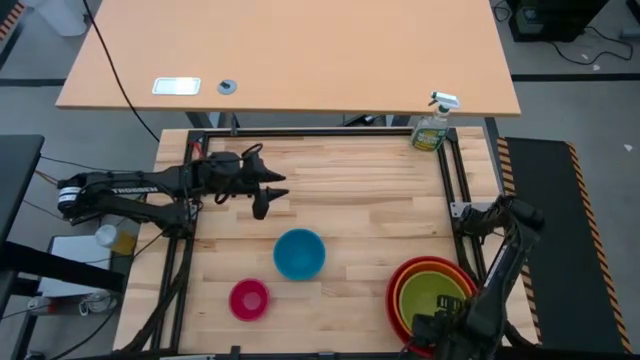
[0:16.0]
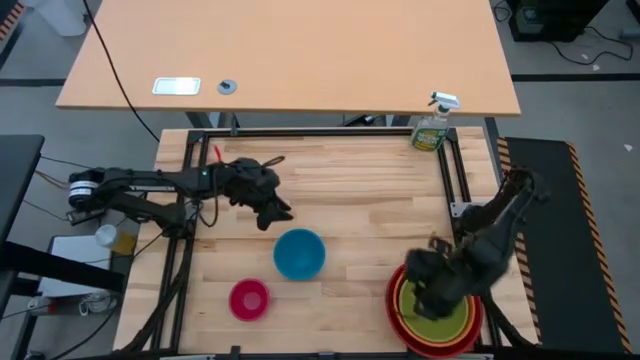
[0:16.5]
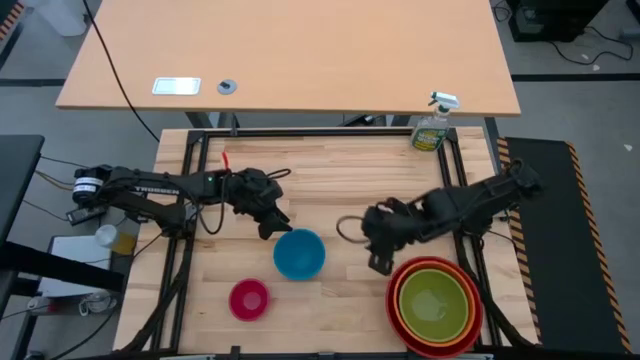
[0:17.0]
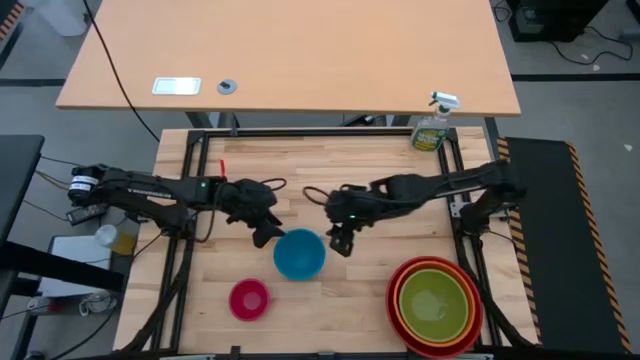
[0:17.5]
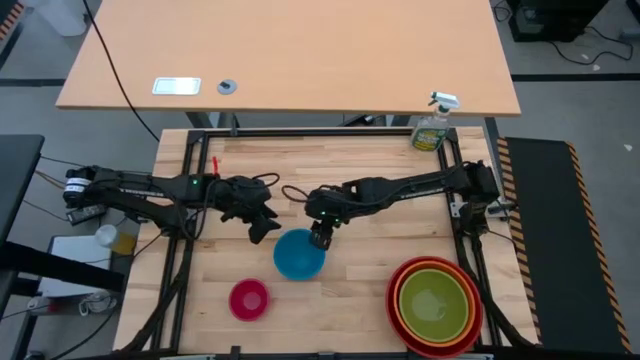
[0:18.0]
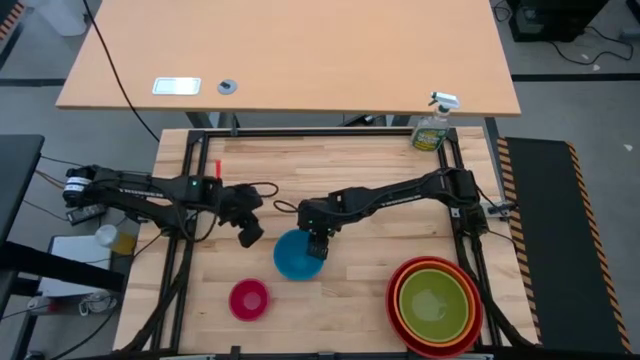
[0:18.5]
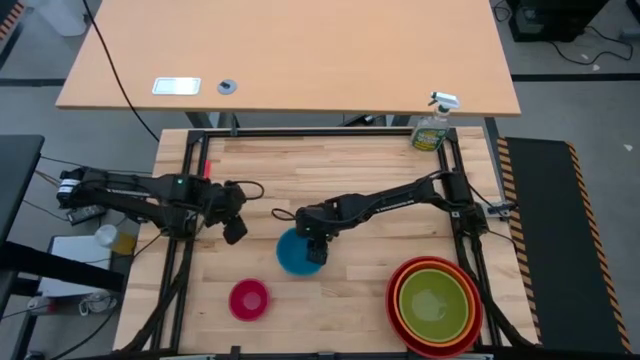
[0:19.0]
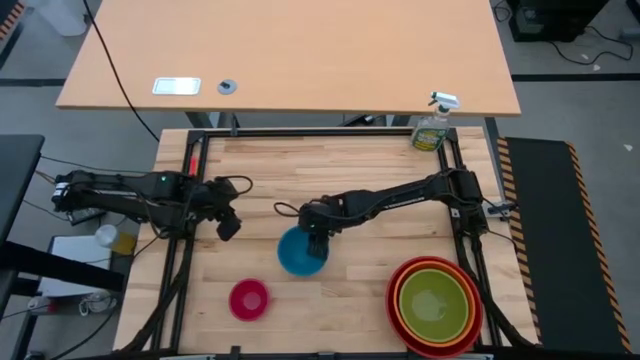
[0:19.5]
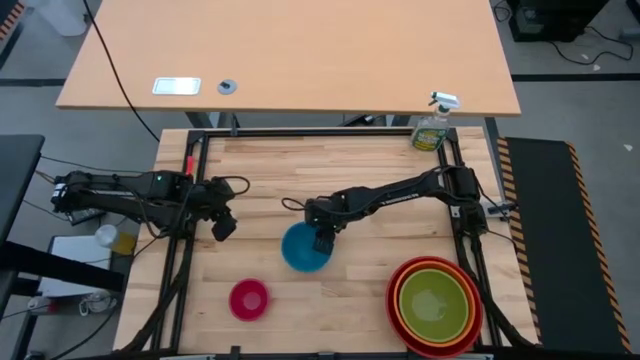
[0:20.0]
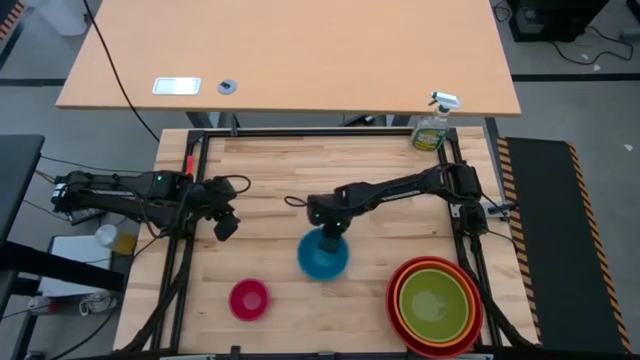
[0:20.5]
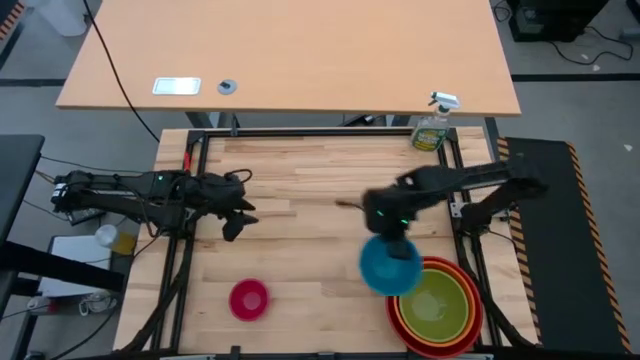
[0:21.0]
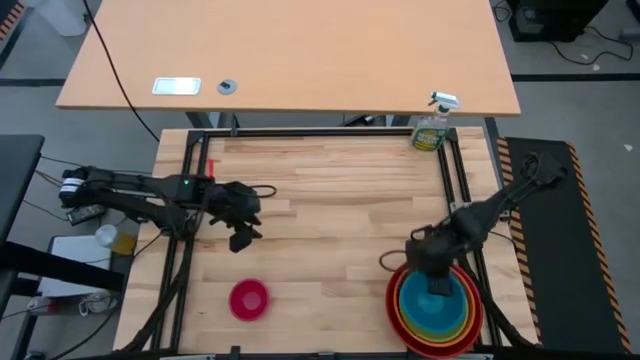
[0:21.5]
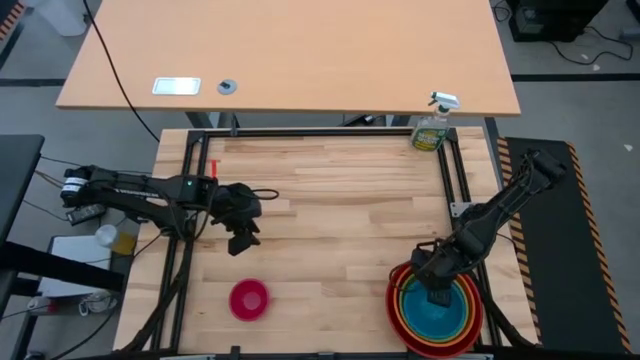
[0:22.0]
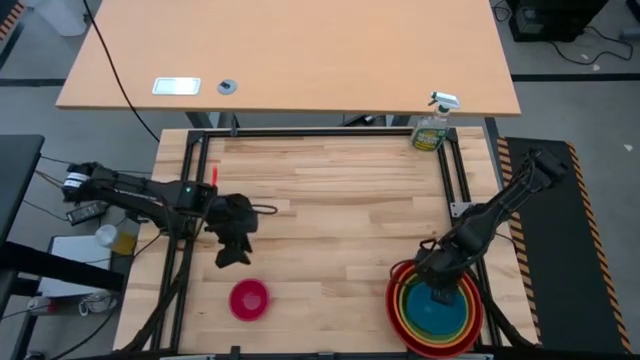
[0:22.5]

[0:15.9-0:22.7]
Stack the blue bowl on the green bowl

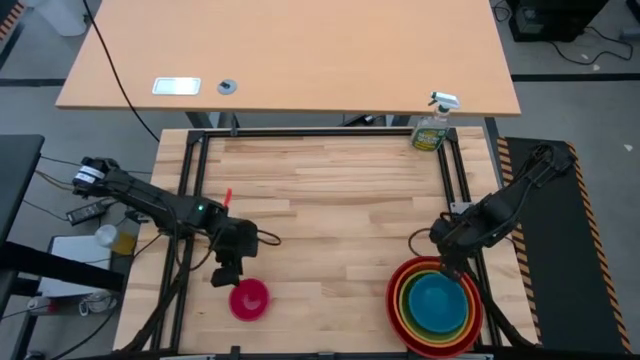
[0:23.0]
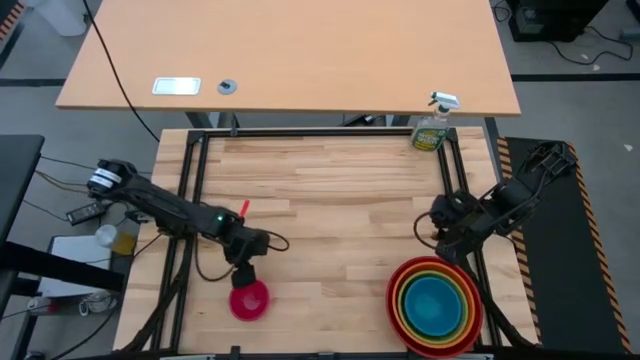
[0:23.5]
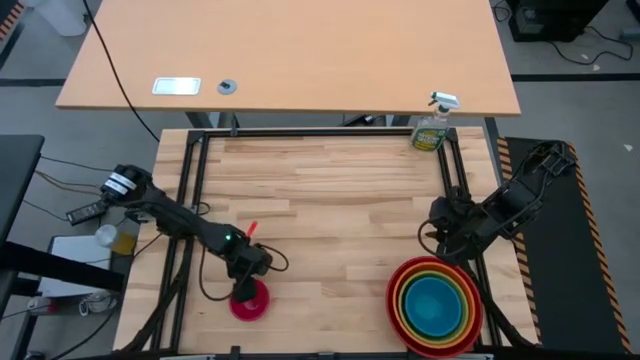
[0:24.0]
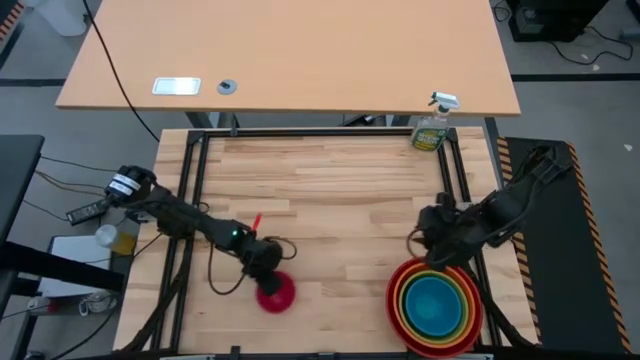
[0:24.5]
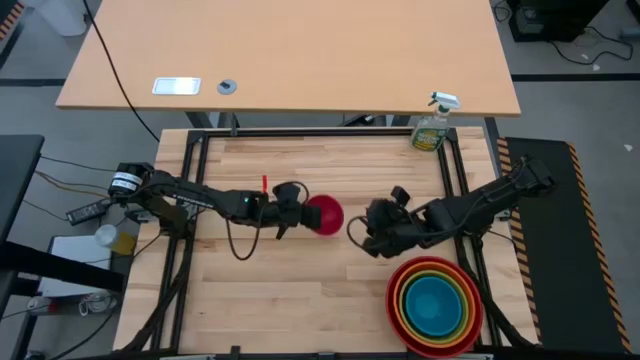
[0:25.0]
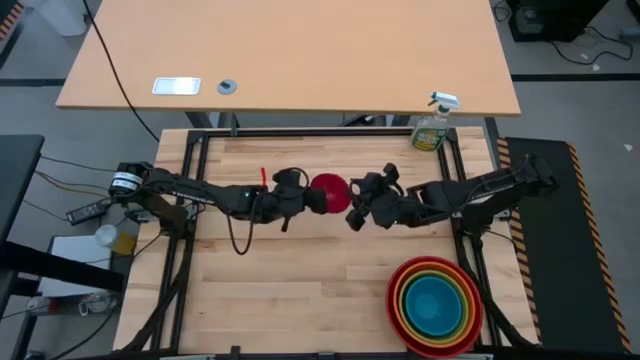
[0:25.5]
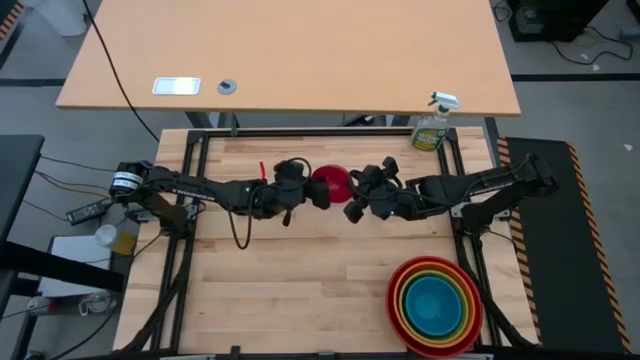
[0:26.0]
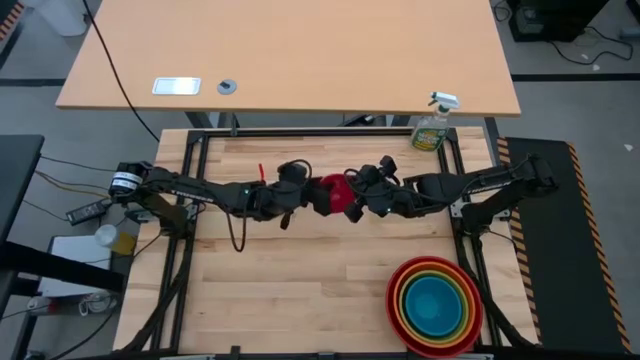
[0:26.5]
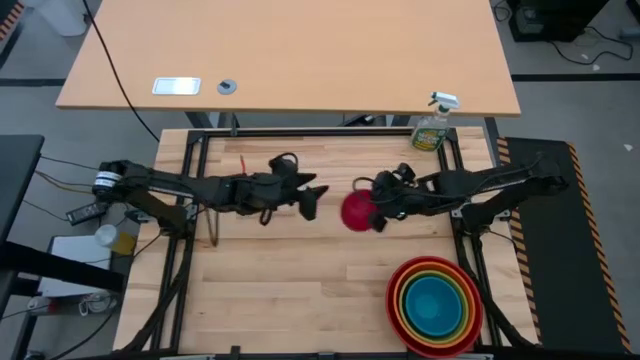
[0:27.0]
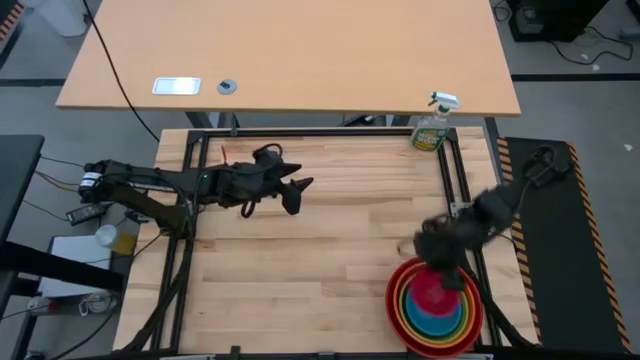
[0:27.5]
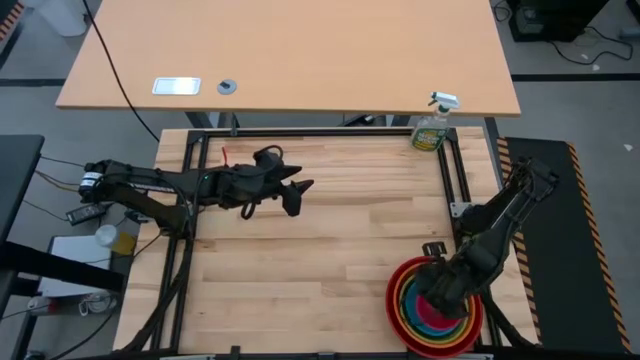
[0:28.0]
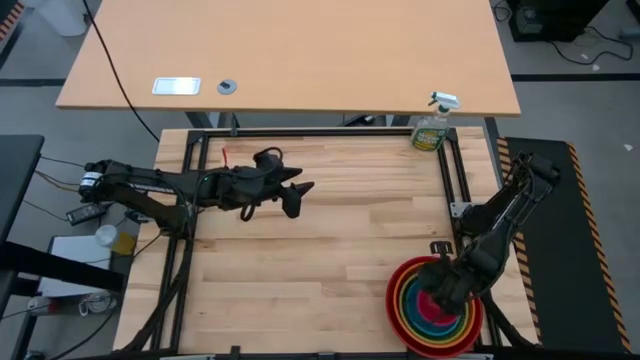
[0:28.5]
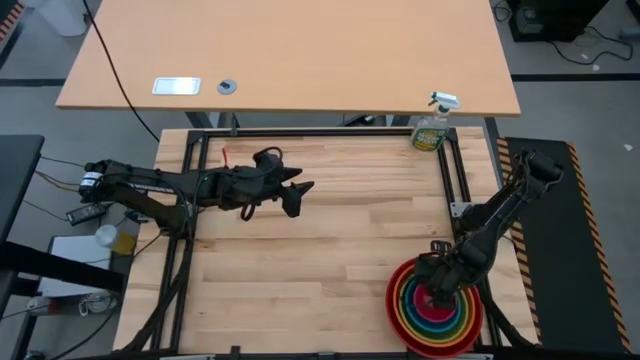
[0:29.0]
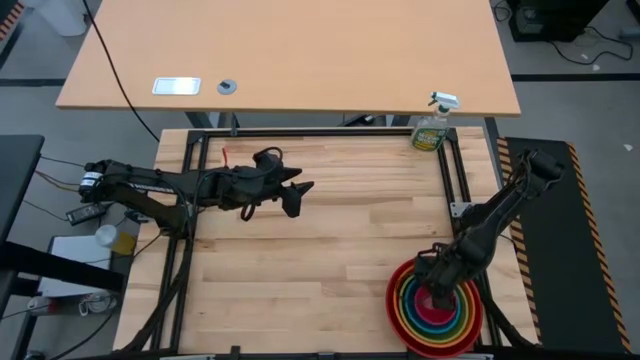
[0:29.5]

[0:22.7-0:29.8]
Stack the pink bowl on the blue bowl

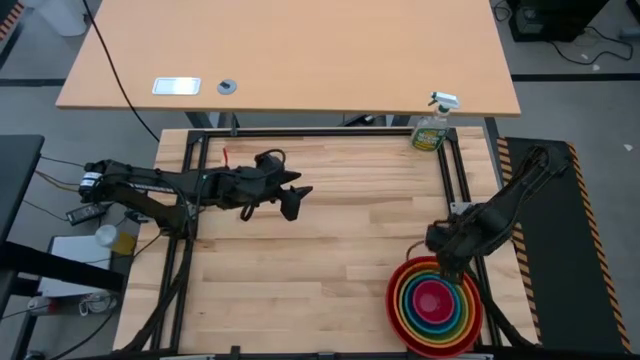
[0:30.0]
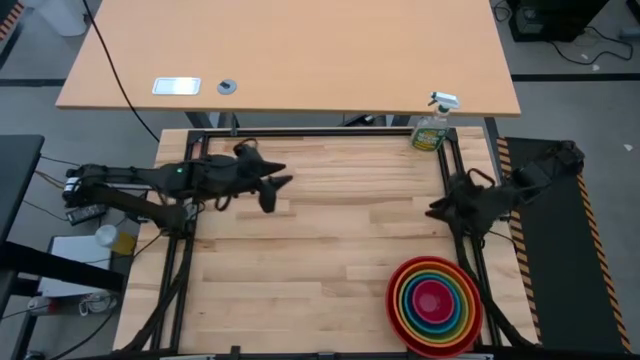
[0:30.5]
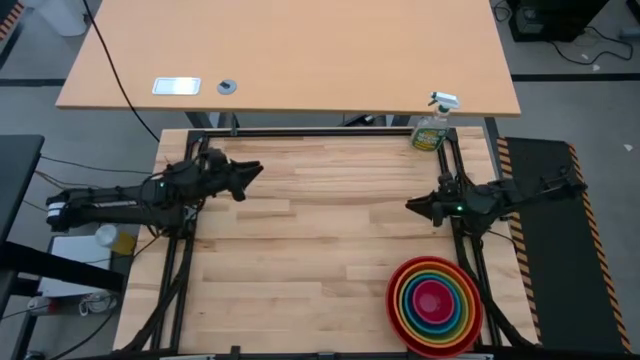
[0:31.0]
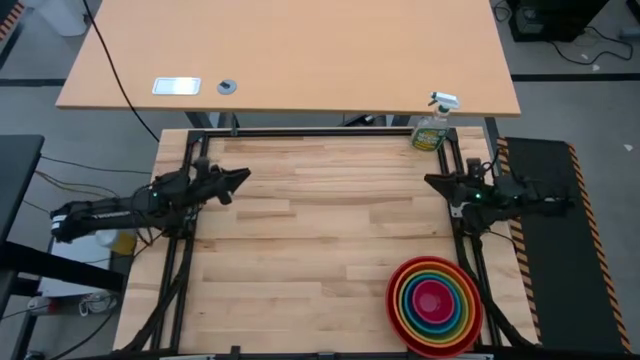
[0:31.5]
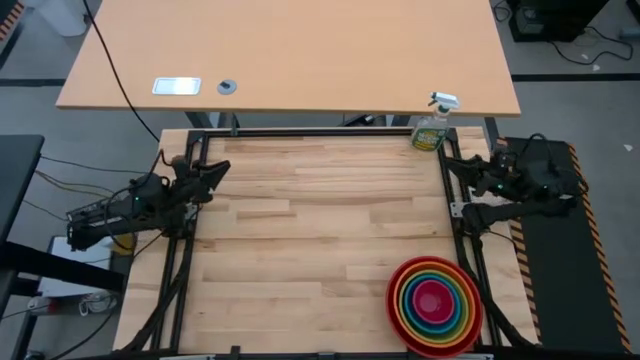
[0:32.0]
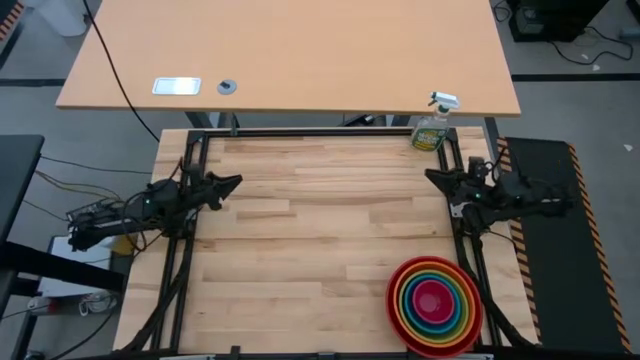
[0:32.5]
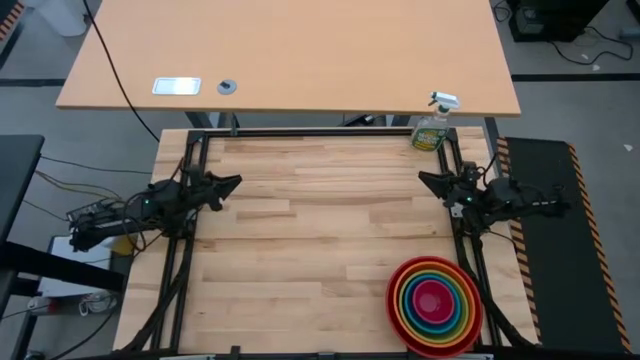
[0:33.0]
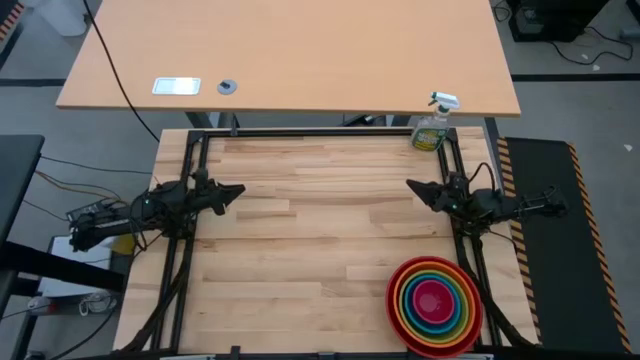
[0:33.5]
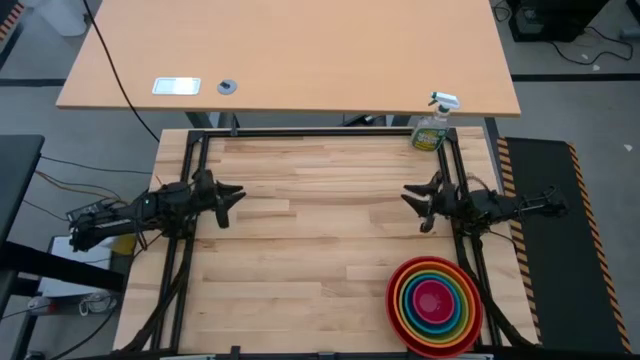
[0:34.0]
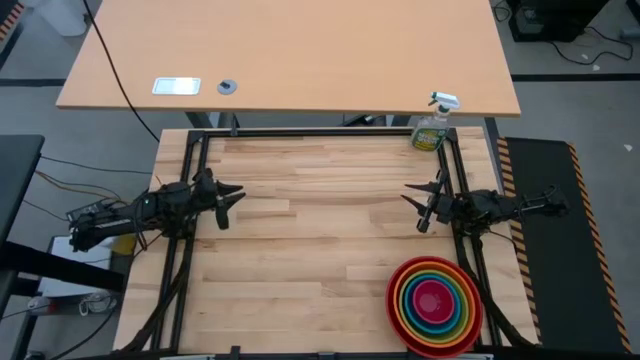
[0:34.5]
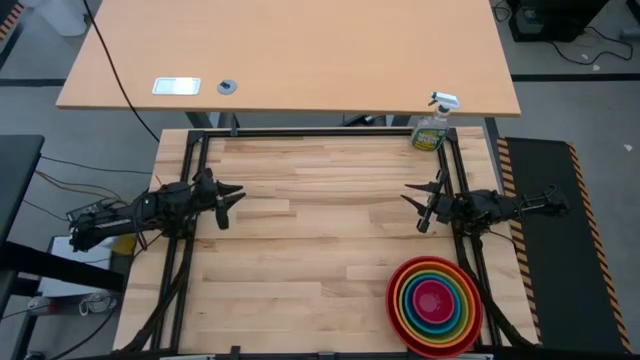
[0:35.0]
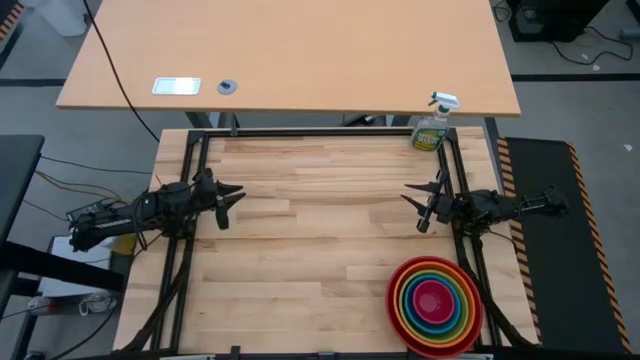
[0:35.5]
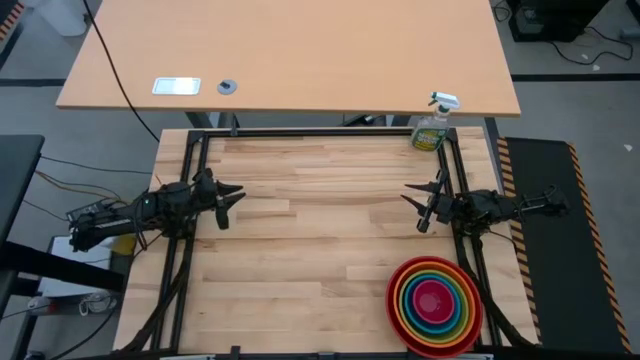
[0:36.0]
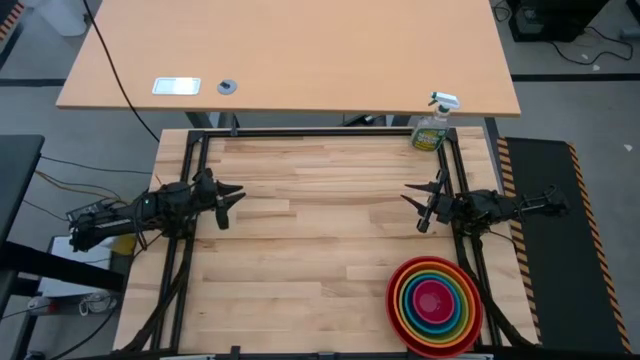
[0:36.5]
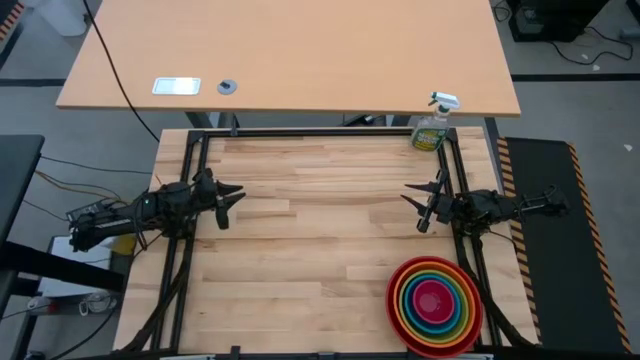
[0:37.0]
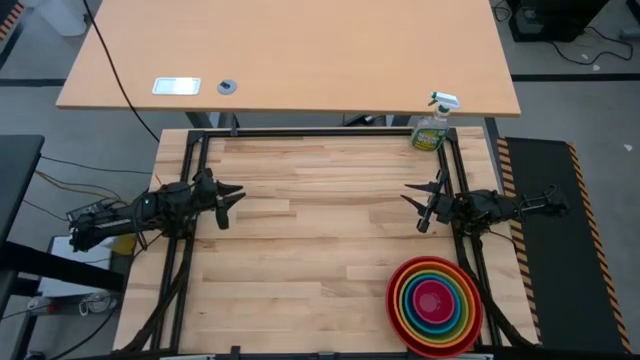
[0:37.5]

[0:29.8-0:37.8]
Return to Home Position
